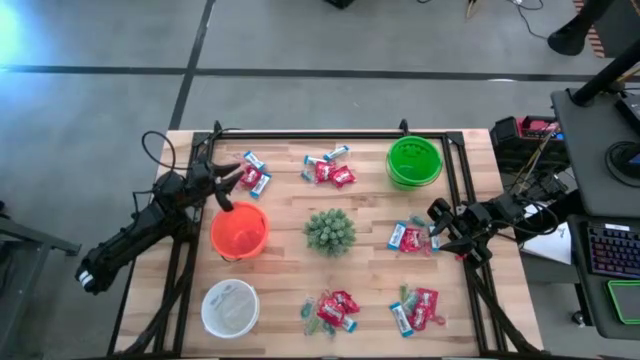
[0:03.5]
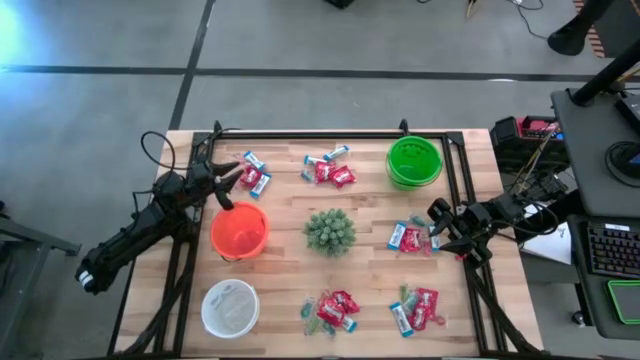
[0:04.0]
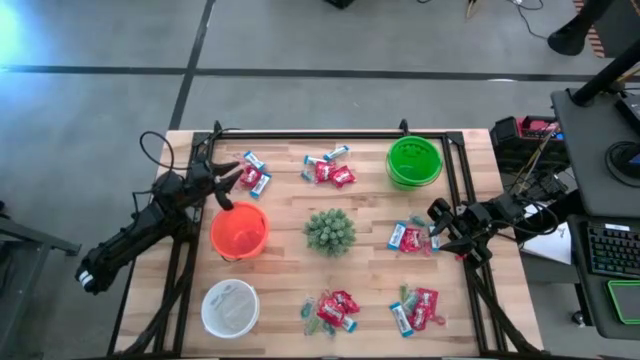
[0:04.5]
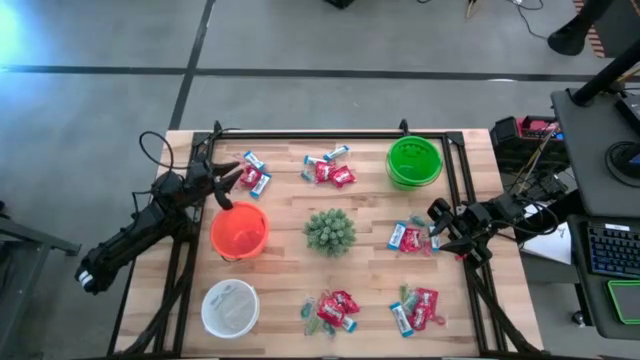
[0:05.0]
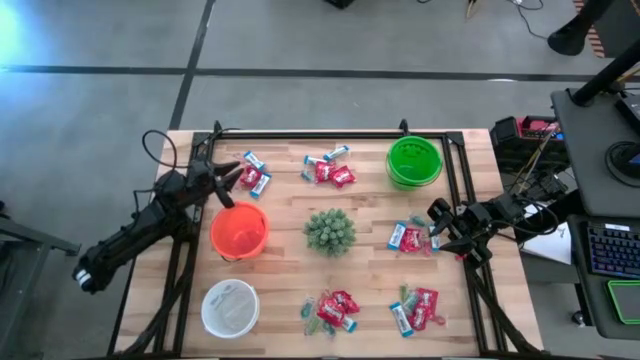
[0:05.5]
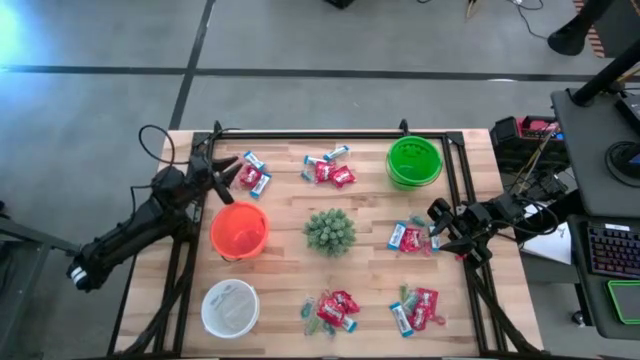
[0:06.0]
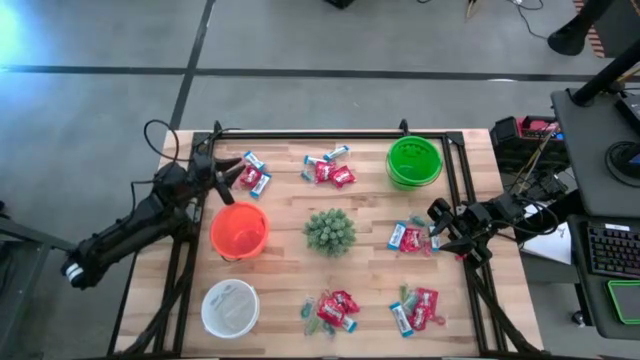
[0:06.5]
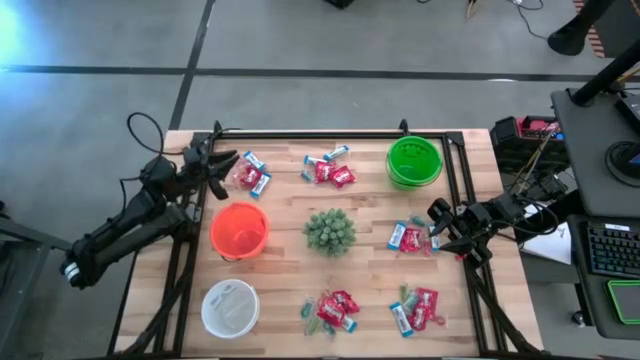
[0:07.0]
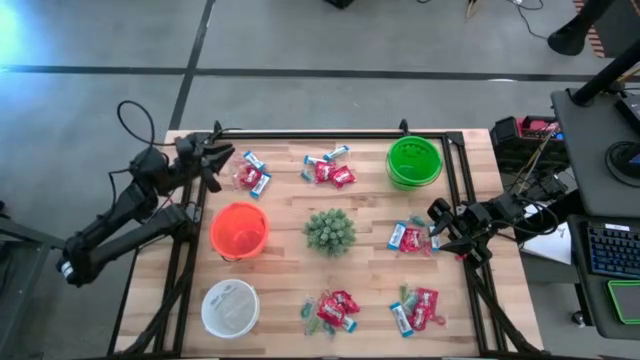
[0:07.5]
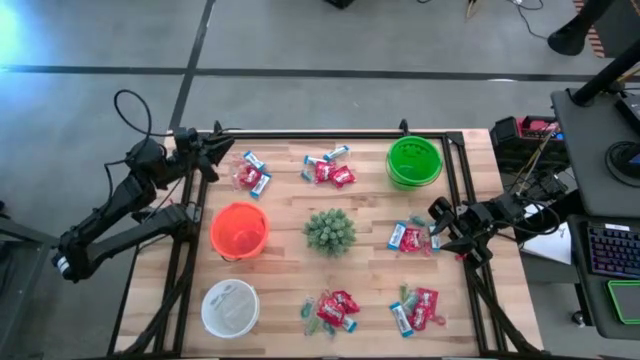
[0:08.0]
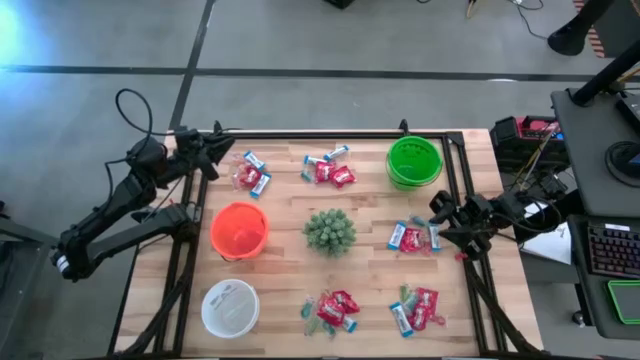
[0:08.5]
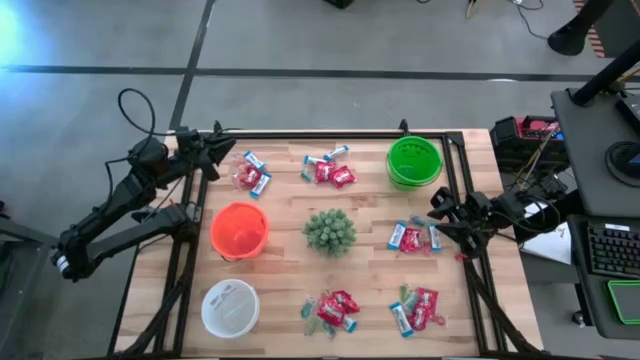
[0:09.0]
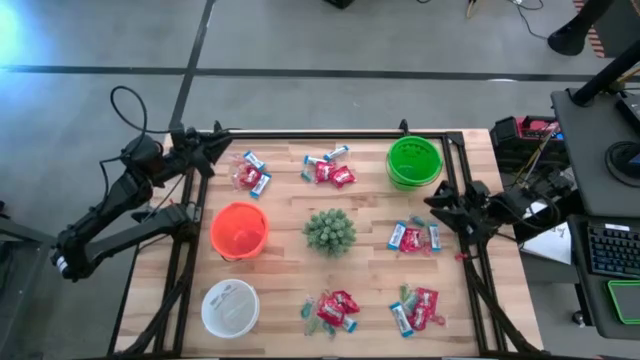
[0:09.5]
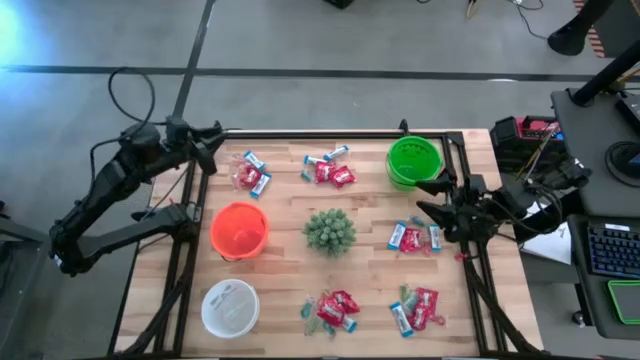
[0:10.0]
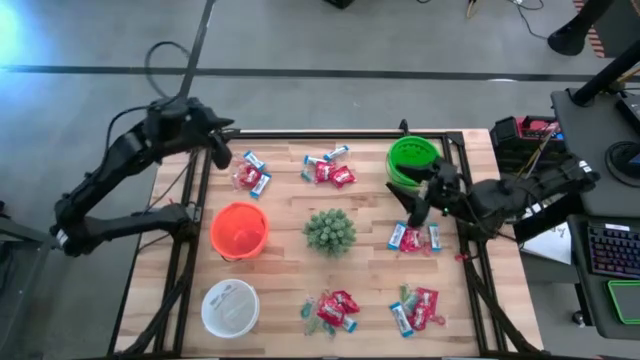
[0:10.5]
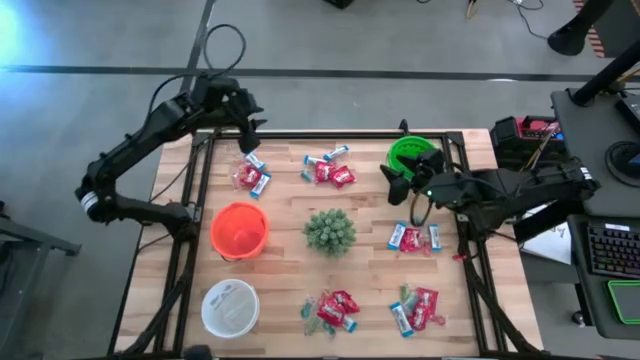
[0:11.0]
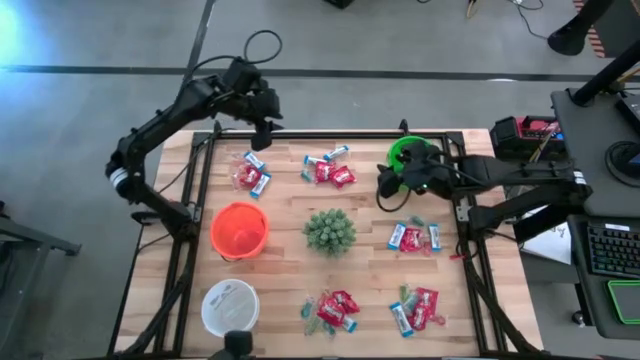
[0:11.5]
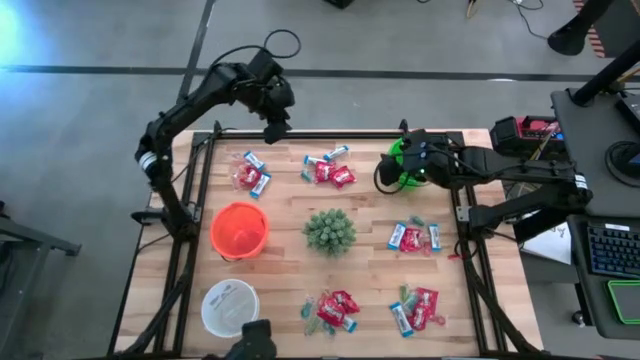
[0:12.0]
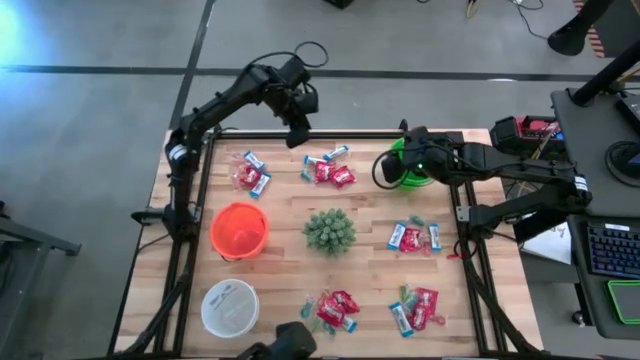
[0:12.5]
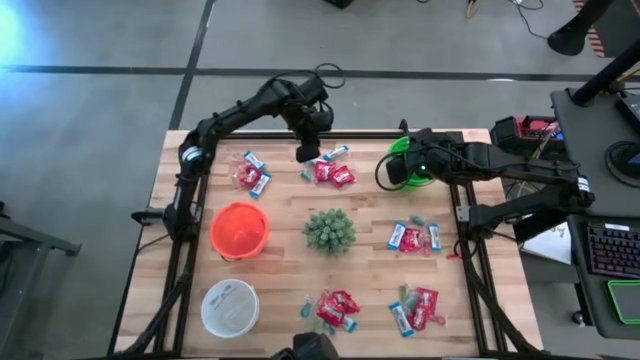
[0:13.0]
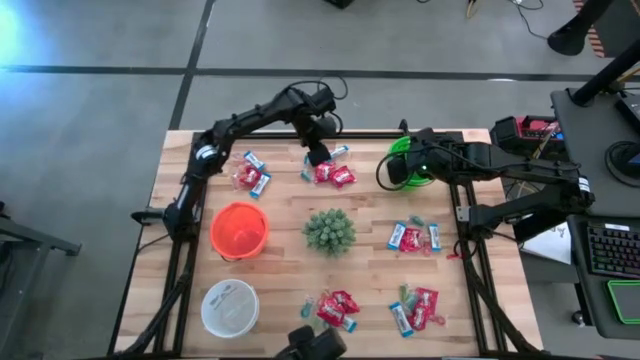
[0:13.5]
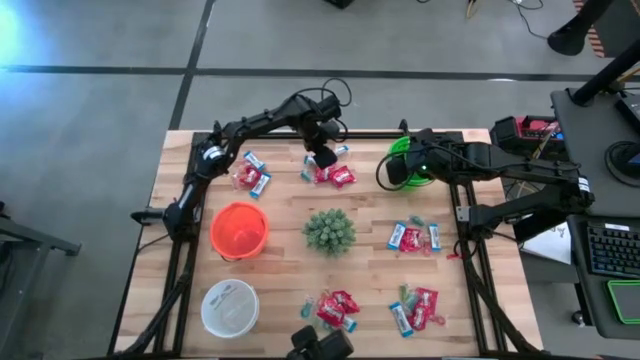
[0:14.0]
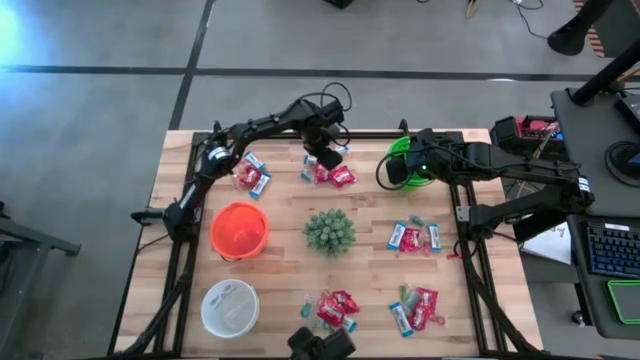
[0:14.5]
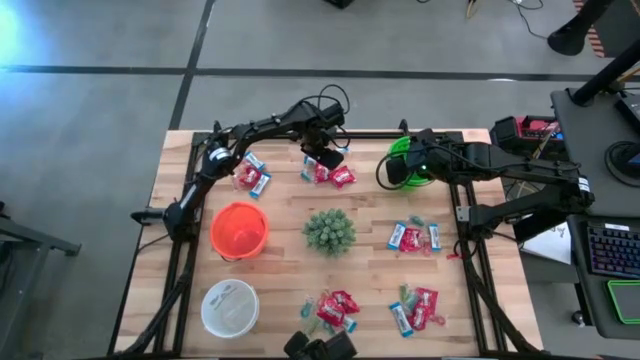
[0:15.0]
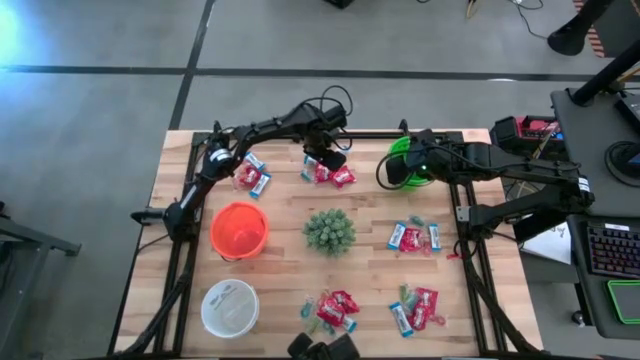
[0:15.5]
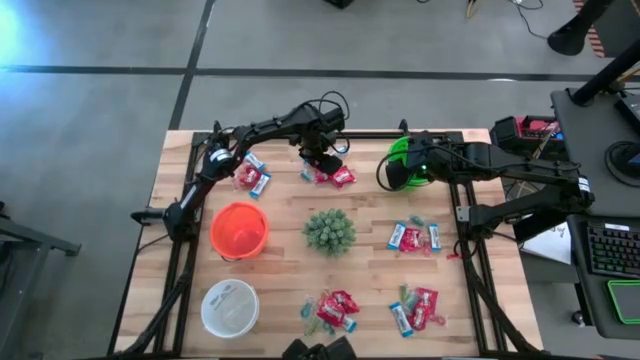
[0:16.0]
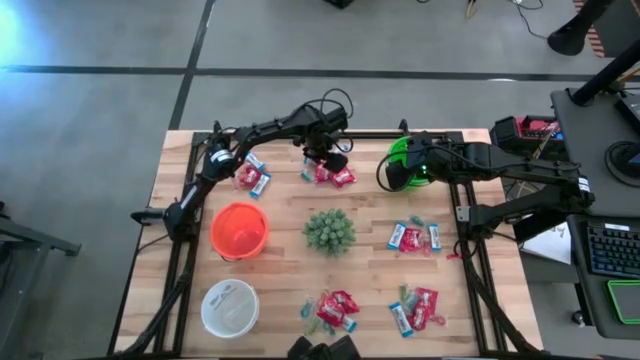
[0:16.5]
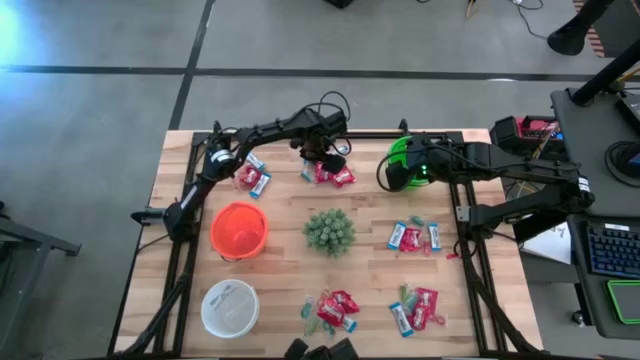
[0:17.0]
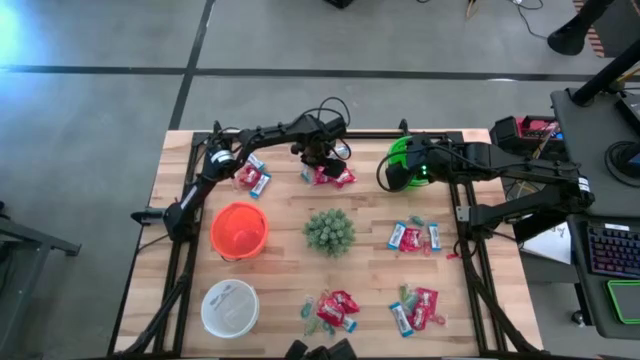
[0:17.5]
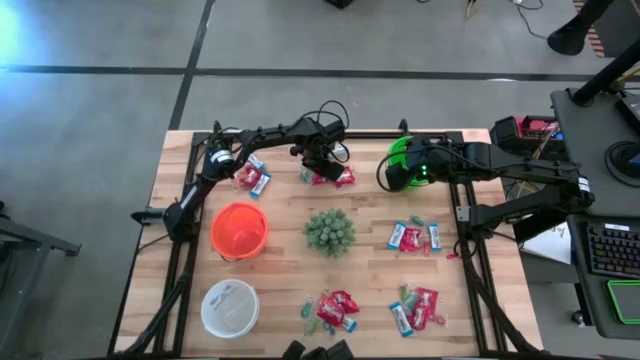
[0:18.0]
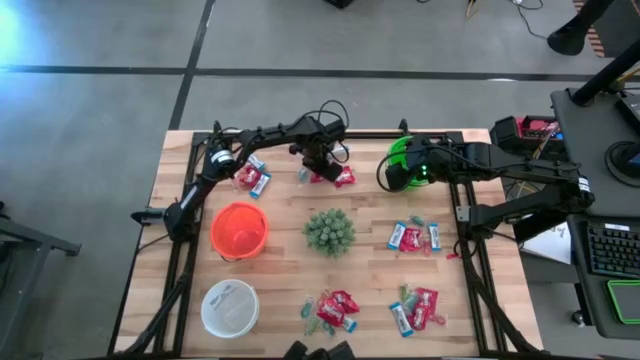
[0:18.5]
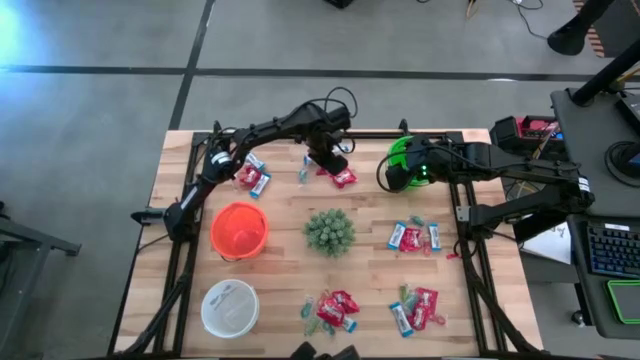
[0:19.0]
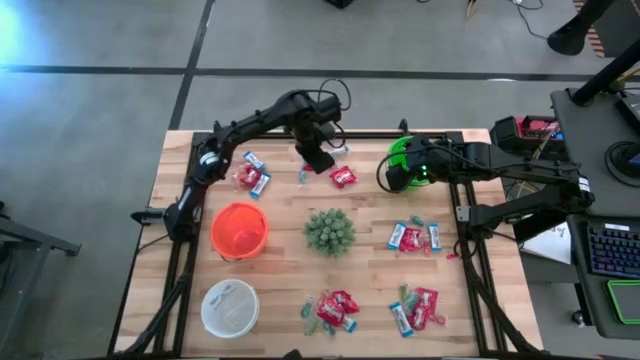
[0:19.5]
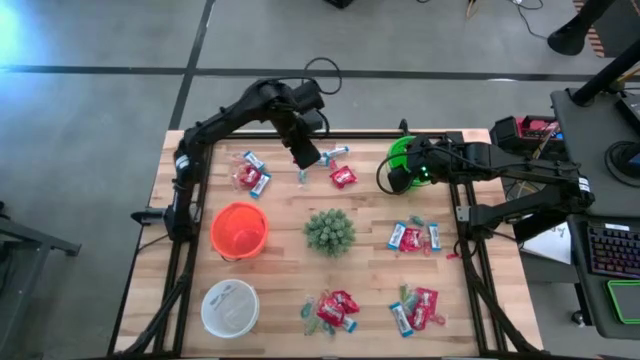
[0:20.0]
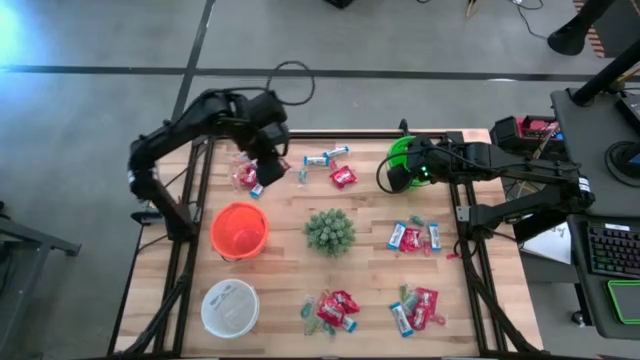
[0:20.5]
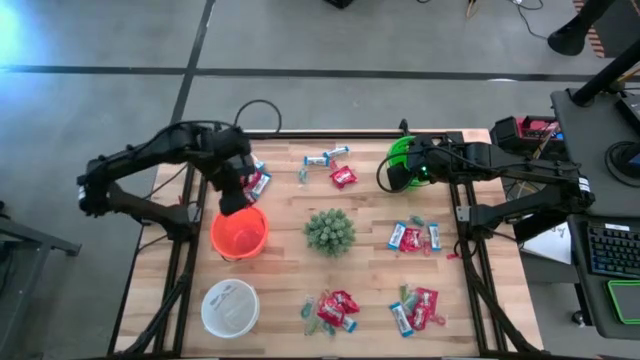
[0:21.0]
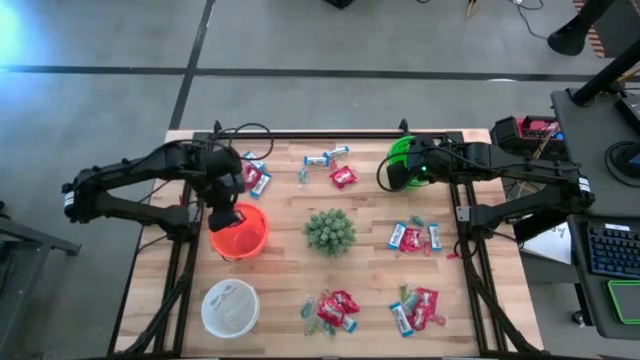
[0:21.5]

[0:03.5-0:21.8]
Task: Sort candy
Put the red candy into the orange bucket

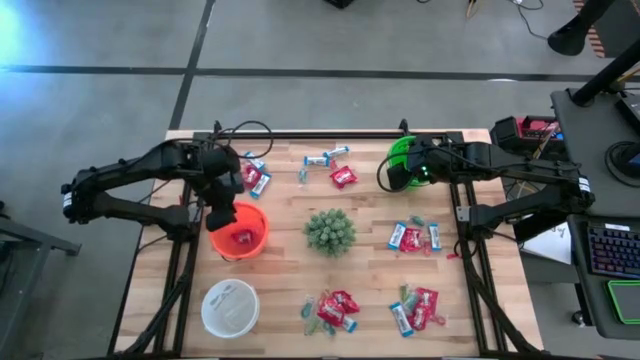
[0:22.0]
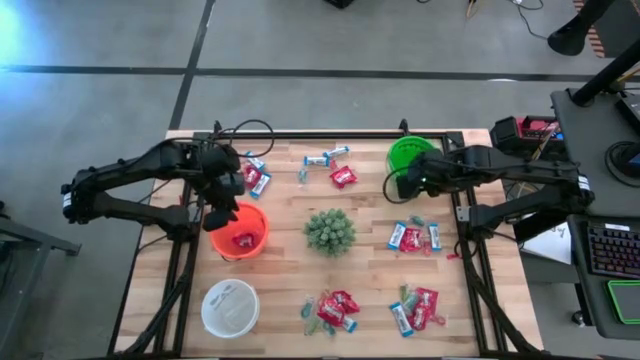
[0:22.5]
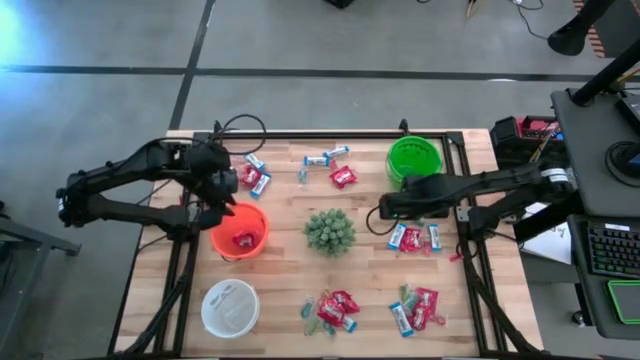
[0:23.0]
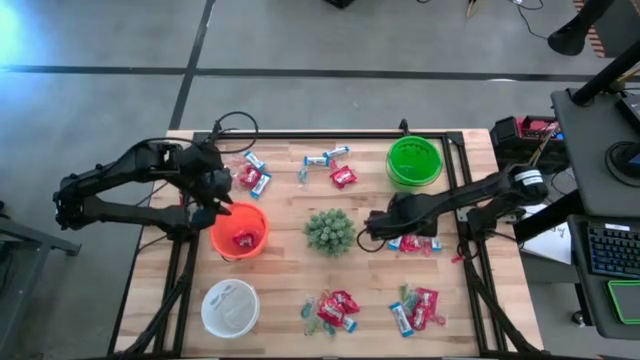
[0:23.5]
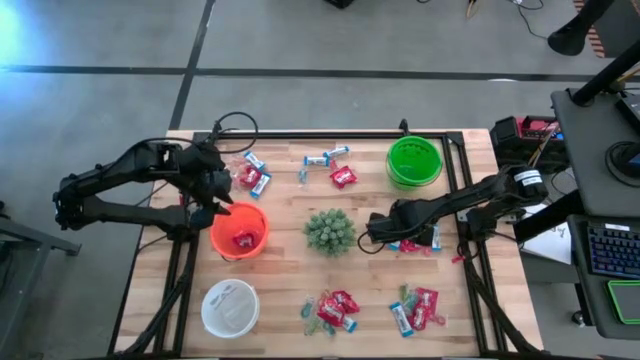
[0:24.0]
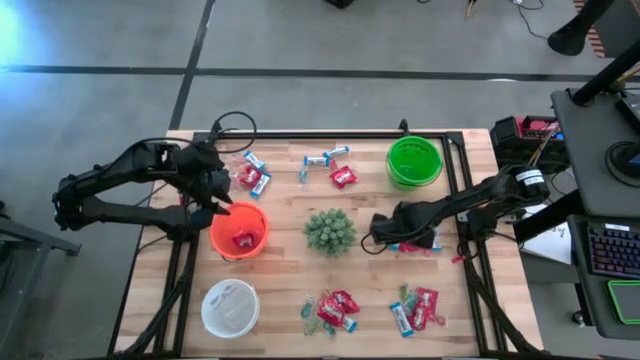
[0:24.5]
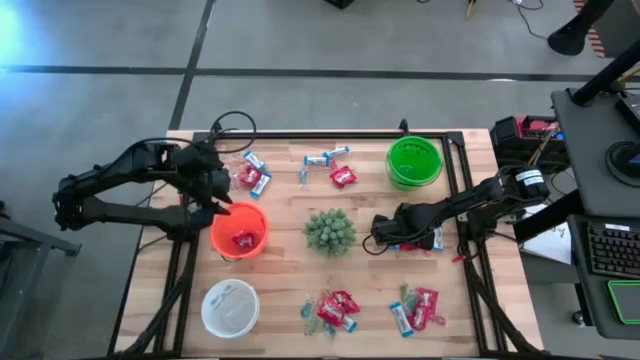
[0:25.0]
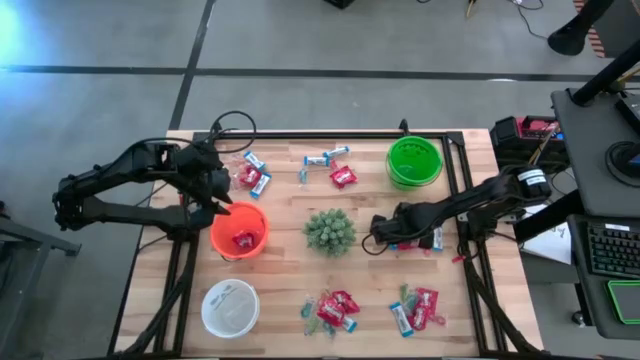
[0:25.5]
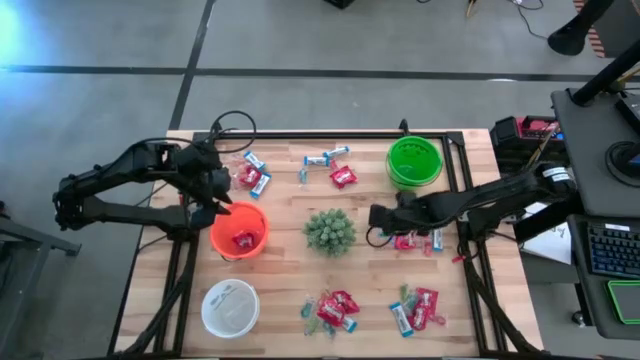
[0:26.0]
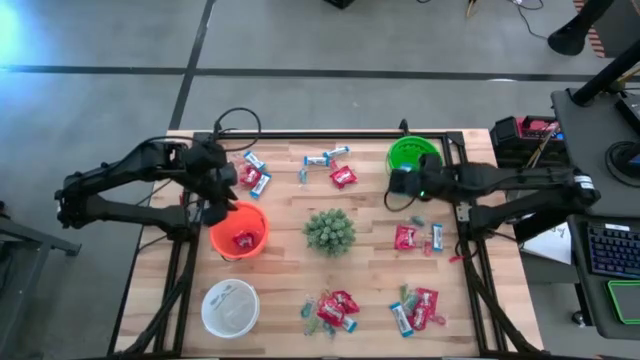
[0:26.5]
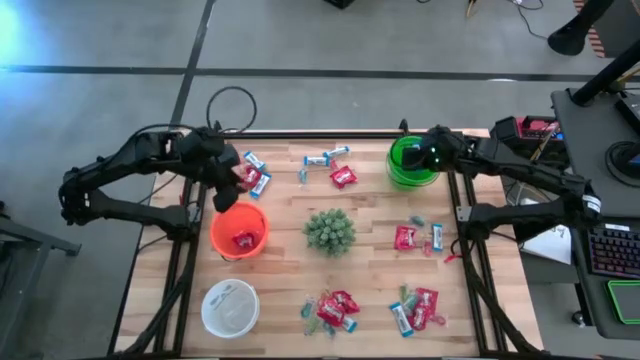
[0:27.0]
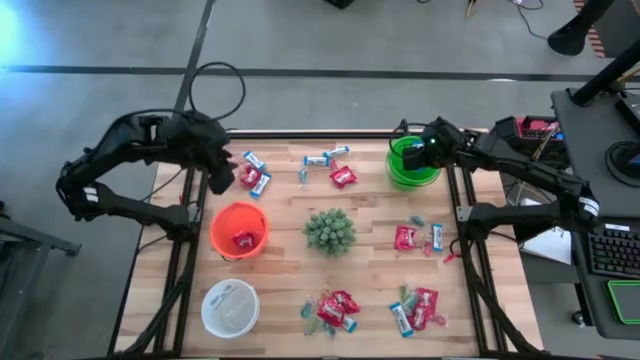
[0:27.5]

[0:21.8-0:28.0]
Put the white chocolate into the green bucket
